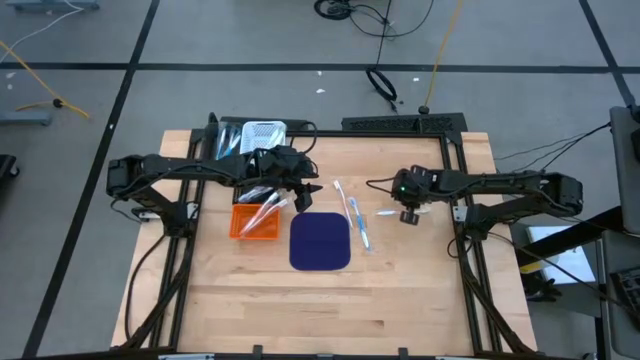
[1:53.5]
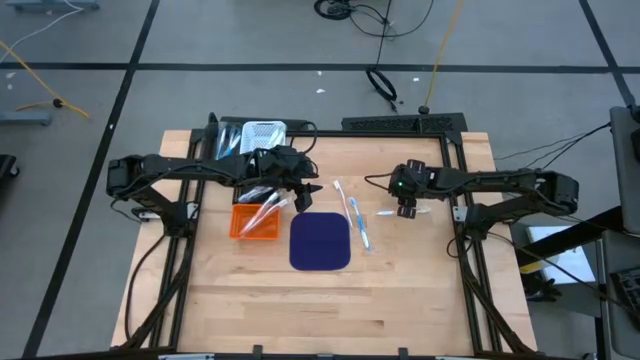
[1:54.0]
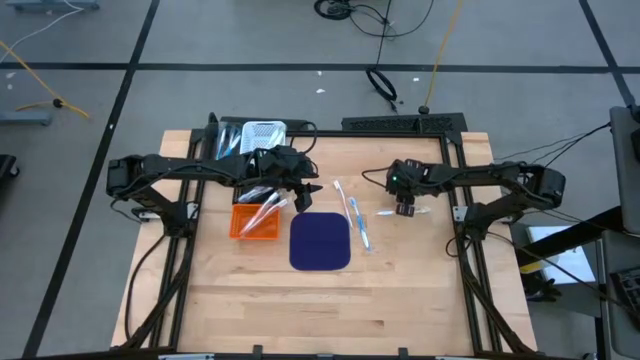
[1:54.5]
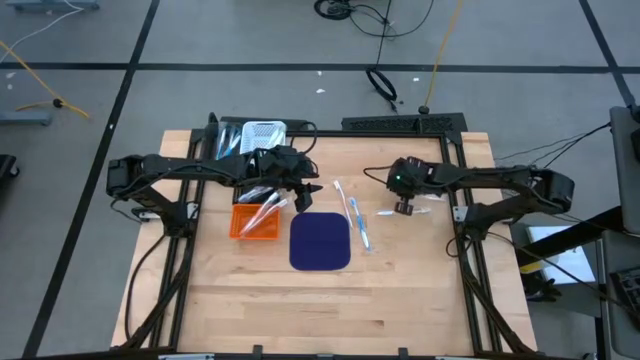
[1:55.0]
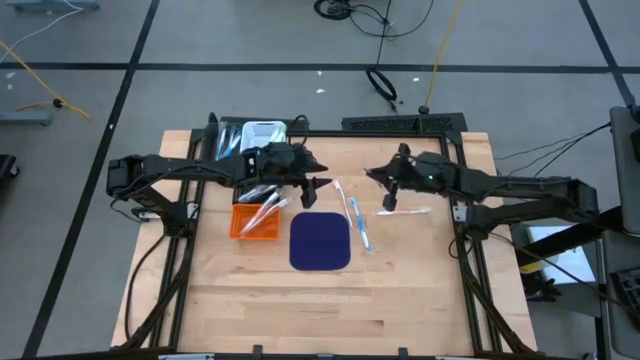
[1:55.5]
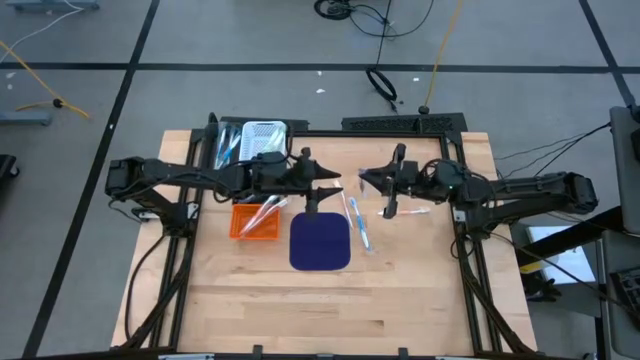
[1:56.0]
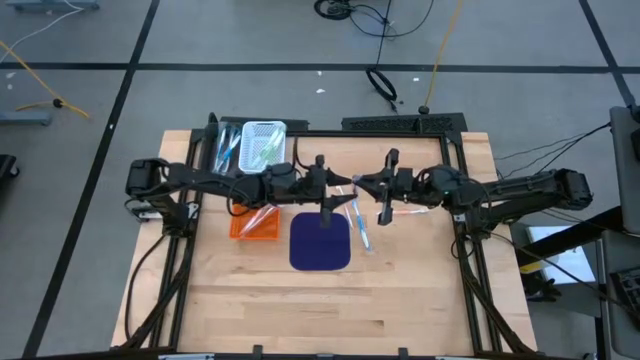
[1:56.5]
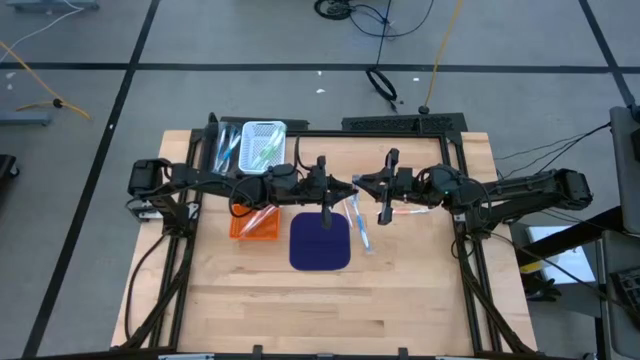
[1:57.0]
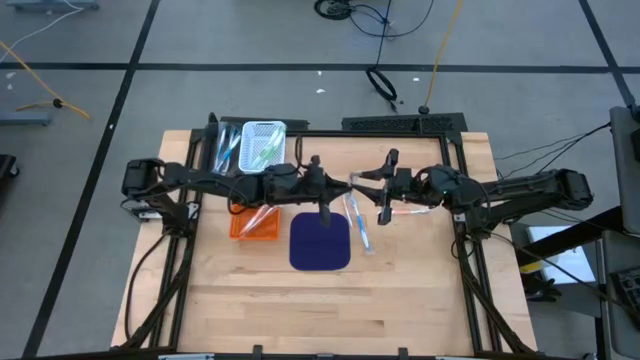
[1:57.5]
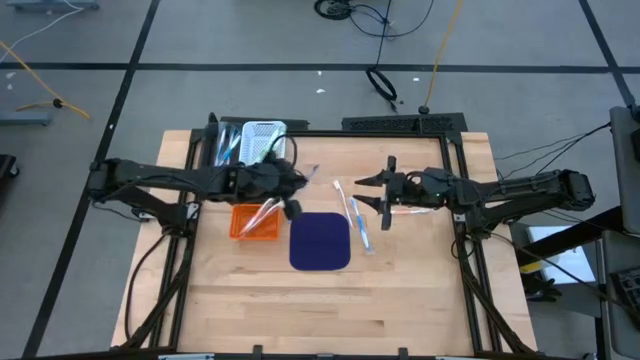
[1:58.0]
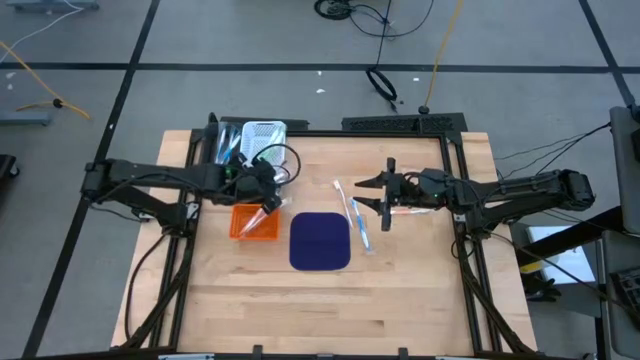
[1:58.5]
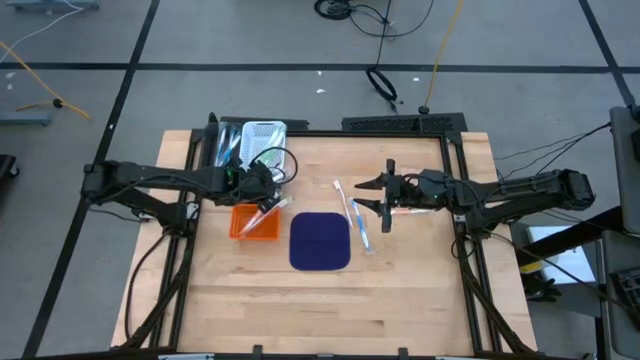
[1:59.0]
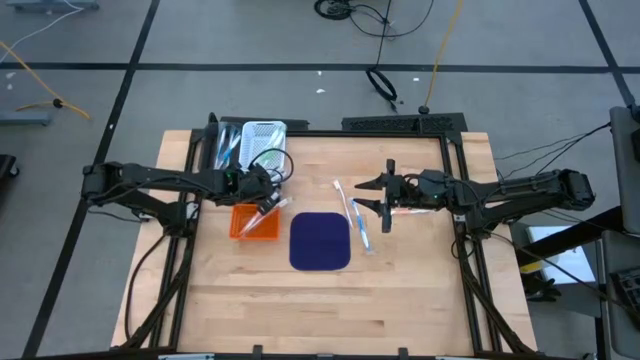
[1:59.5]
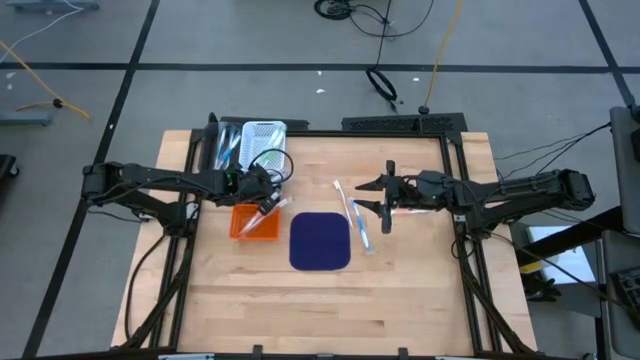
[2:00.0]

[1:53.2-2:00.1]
Task: Pick & Place Toothbrushes
Put the violet toothbrush into the black bin

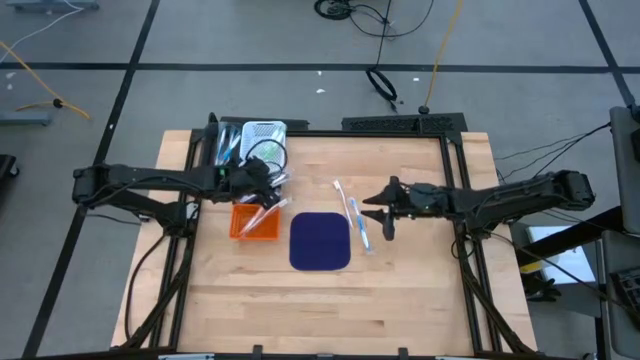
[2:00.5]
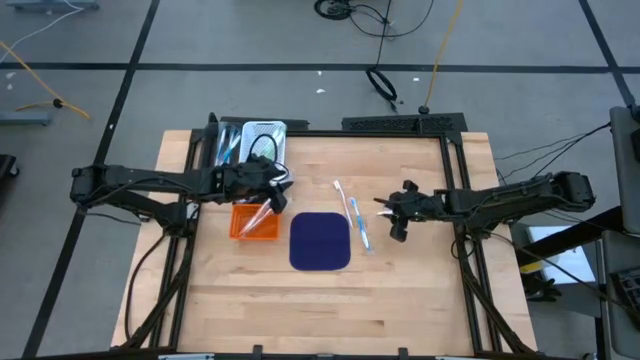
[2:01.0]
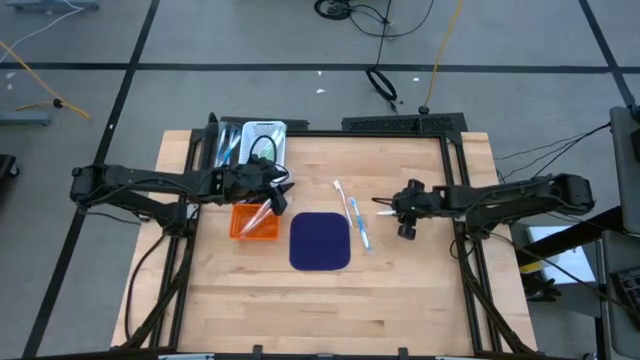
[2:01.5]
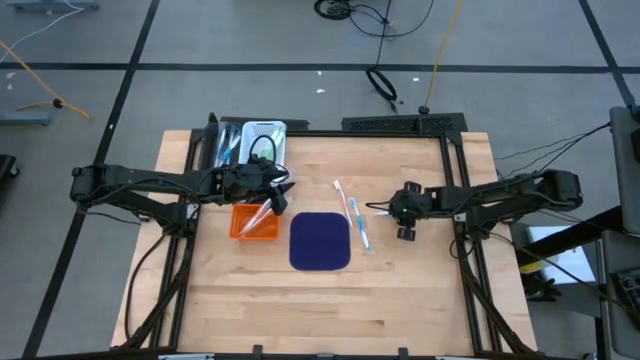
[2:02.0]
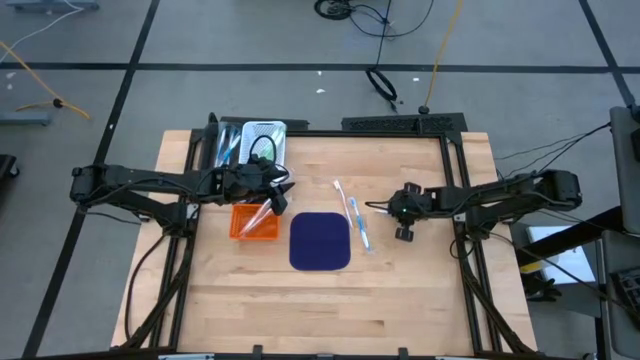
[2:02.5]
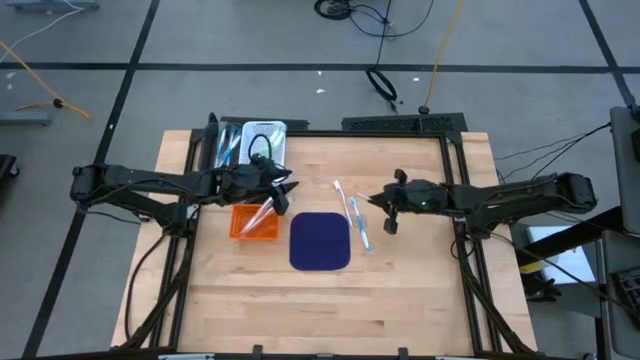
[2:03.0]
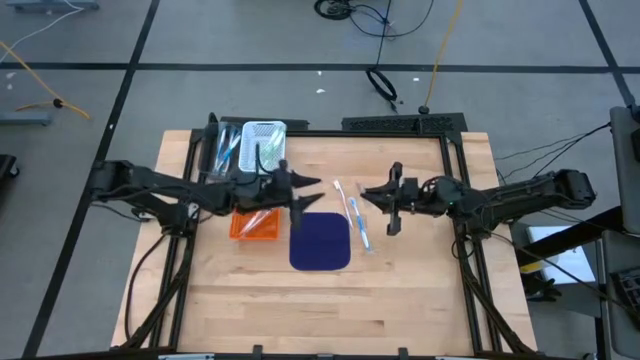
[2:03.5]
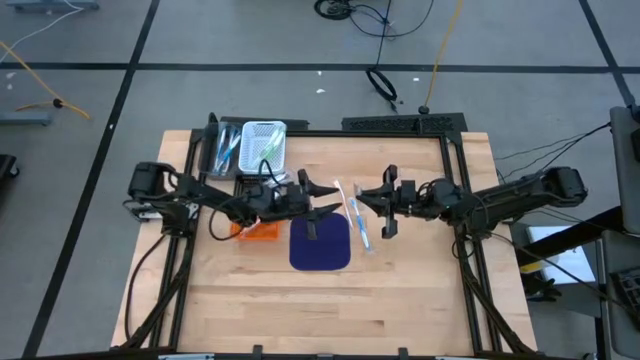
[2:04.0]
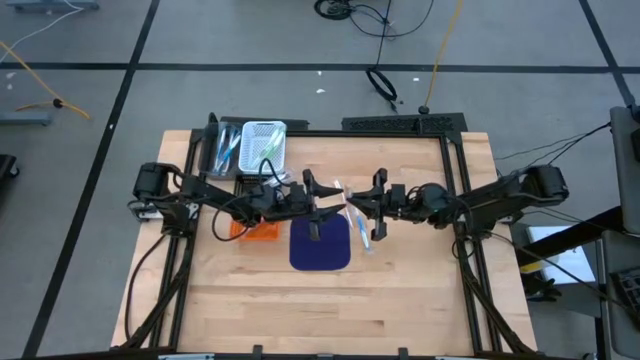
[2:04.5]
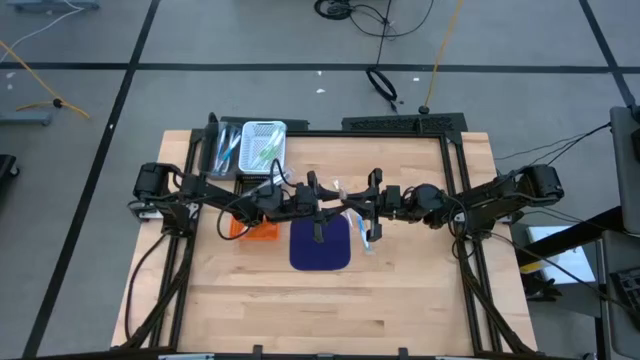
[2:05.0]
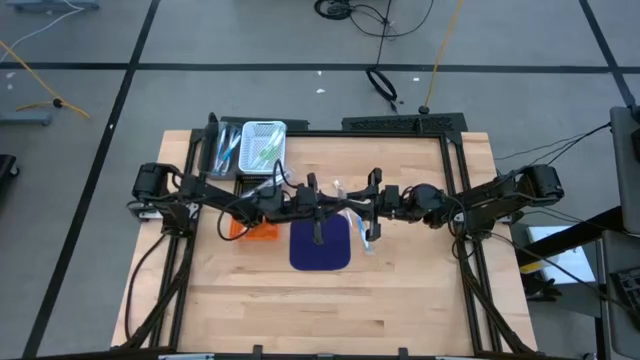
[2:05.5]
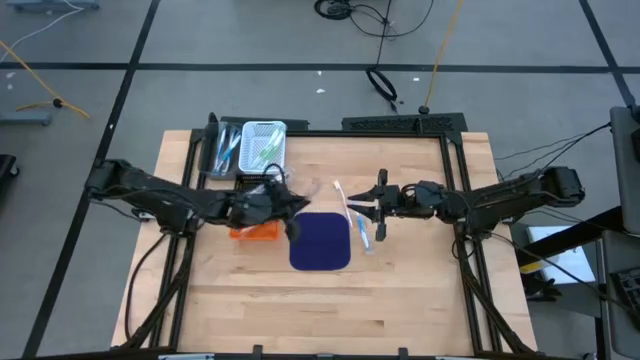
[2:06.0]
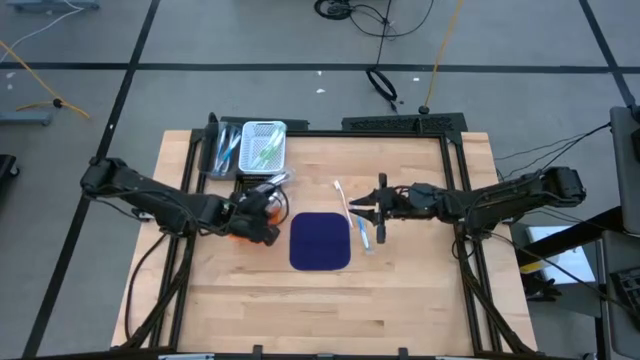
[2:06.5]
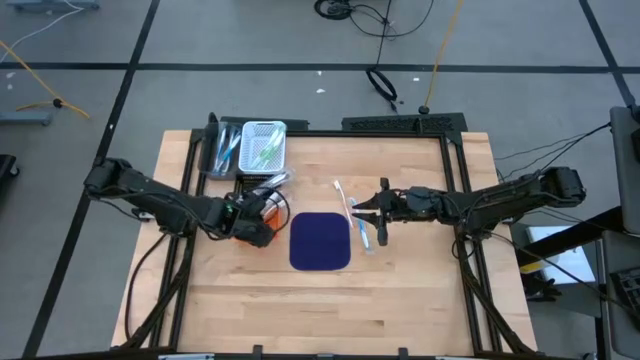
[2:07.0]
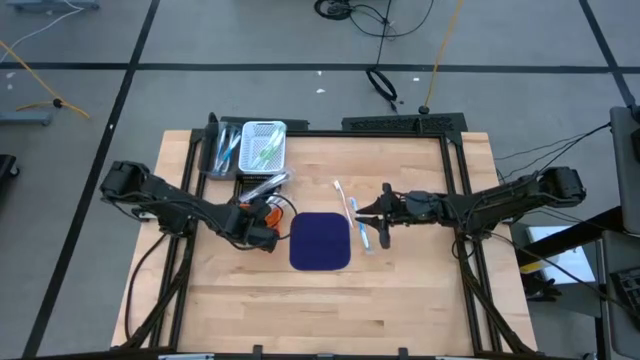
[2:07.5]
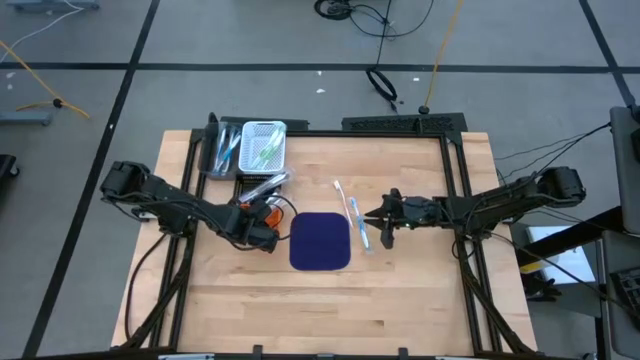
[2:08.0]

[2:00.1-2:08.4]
Put the orange toothbrush into the orange bin

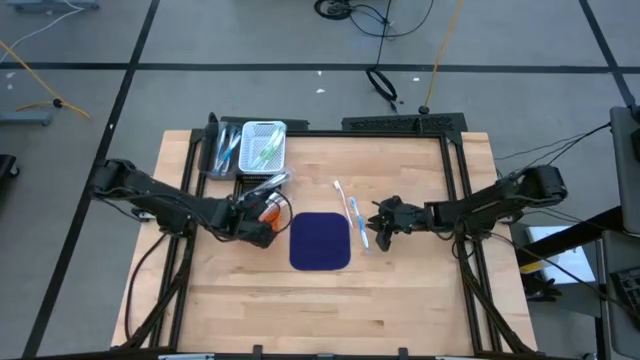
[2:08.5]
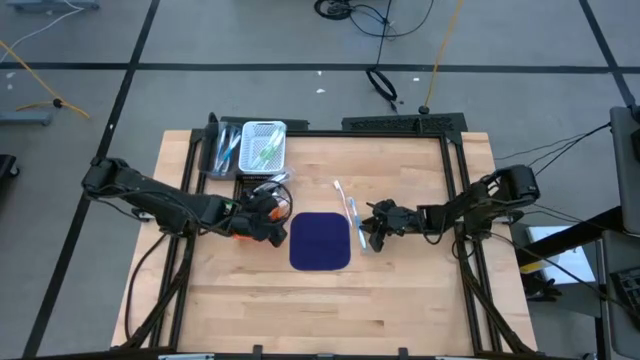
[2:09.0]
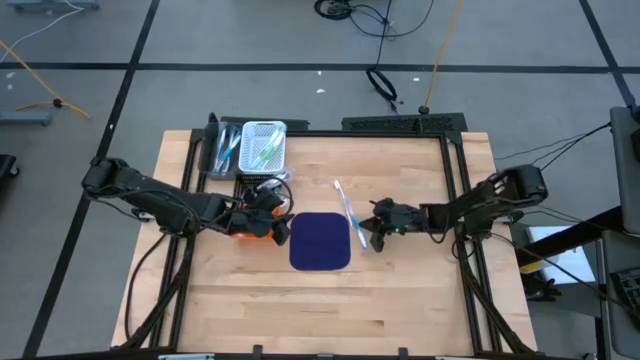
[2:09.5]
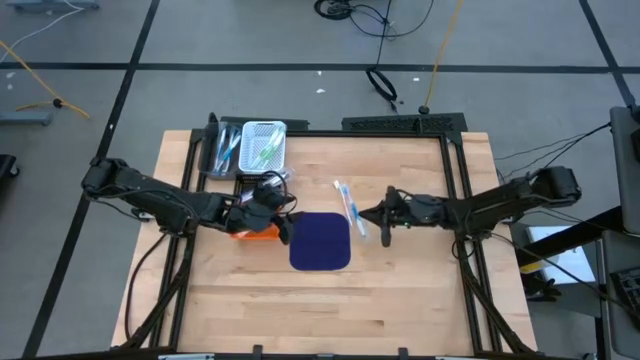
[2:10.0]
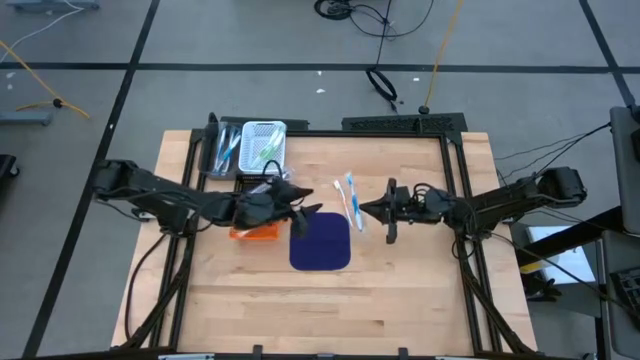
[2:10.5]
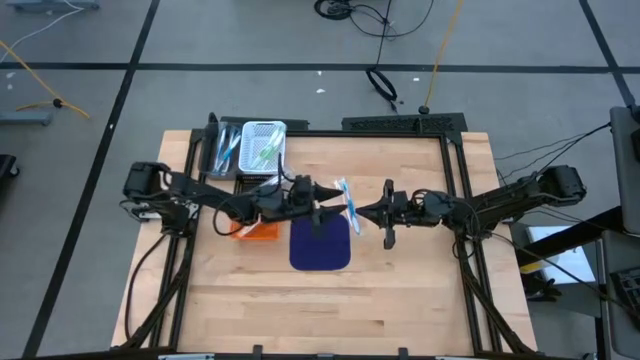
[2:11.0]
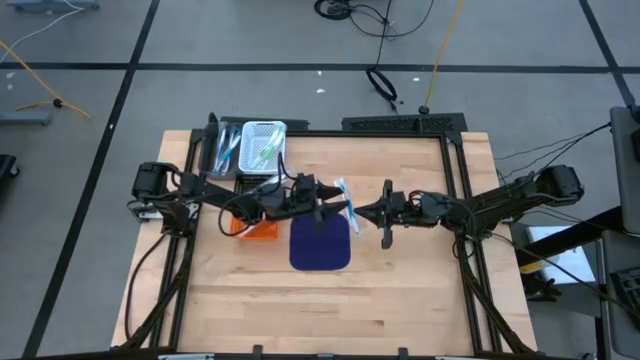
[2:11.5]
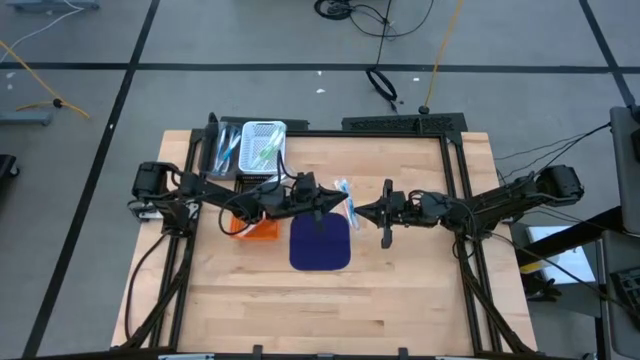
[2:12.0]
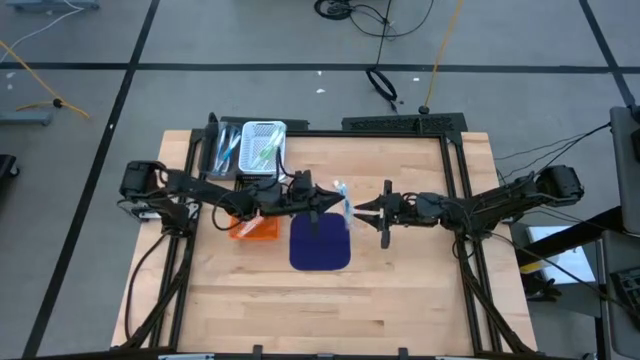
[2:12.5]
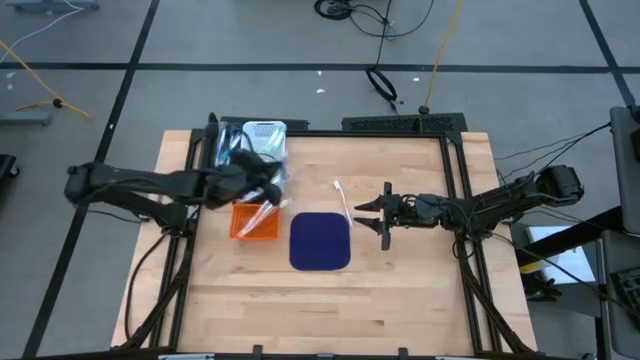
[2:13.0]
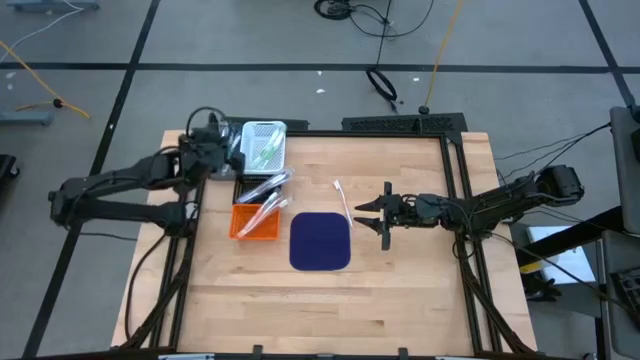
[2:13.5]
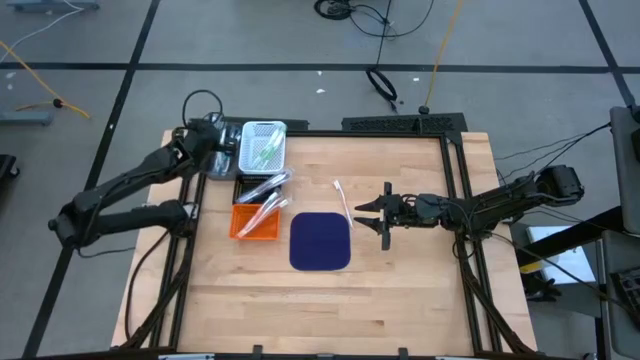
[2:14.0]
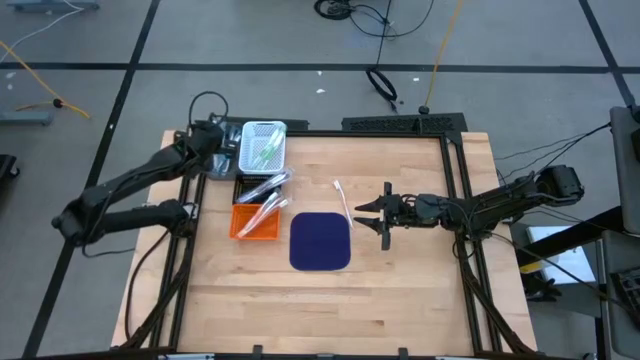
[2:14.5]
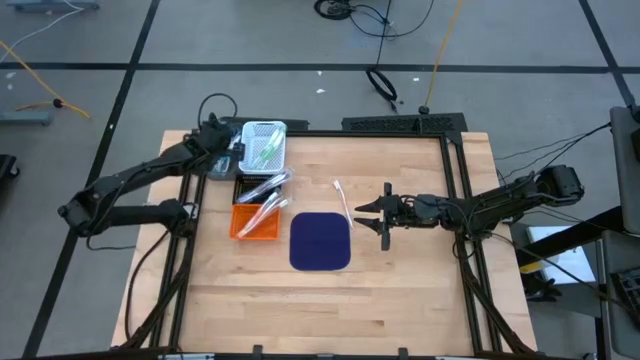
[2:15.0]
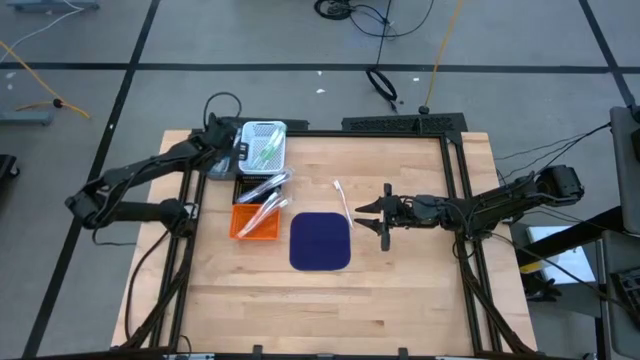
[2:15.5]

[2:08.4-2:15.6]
Put the blue toothbrush into the gray bin
